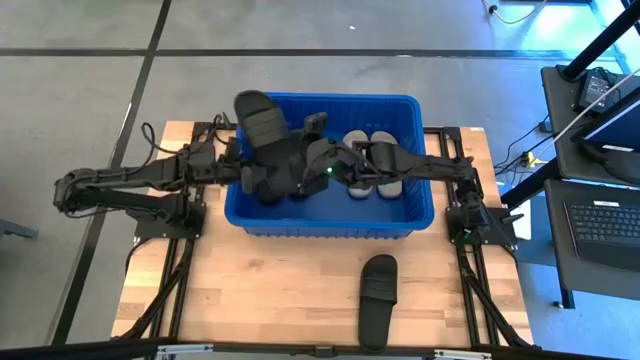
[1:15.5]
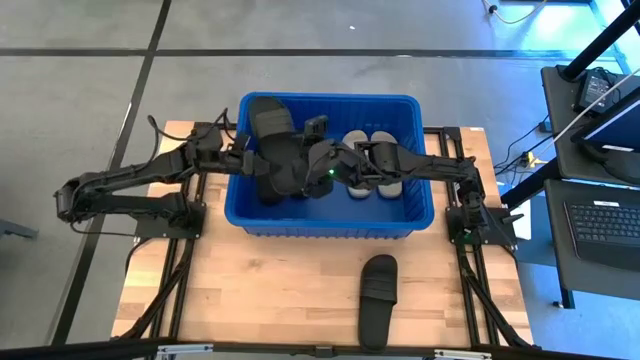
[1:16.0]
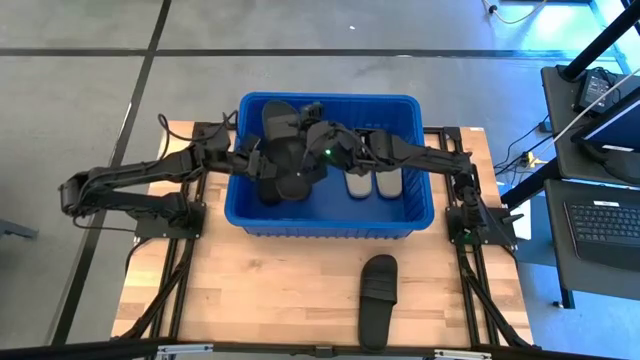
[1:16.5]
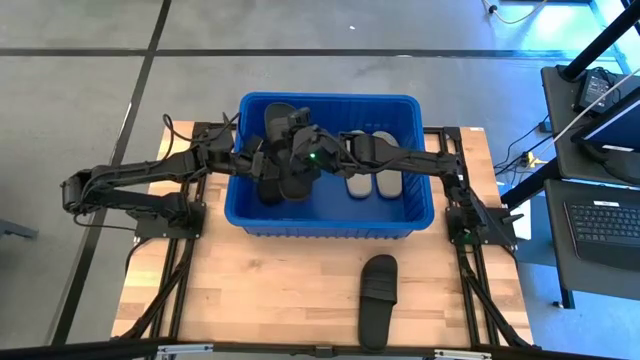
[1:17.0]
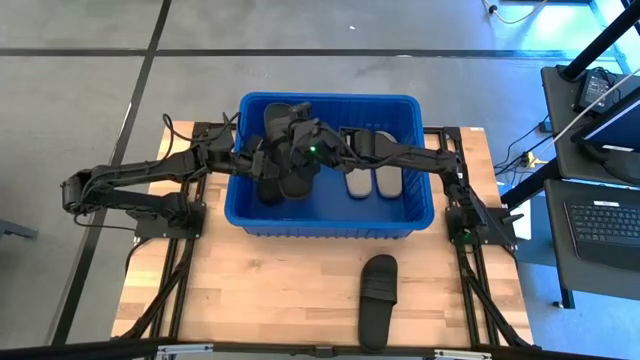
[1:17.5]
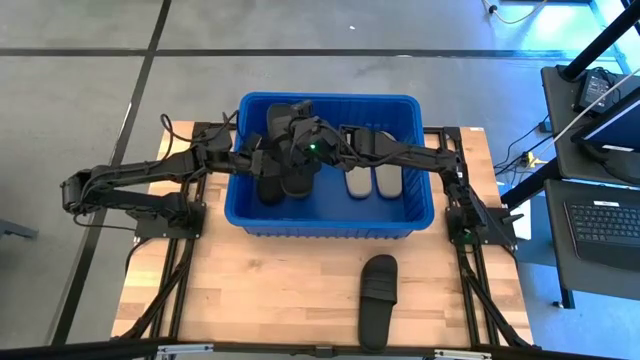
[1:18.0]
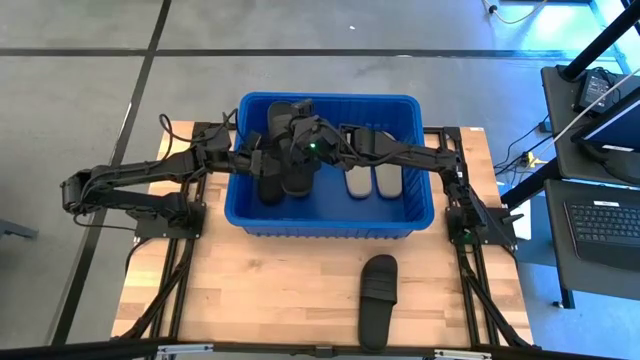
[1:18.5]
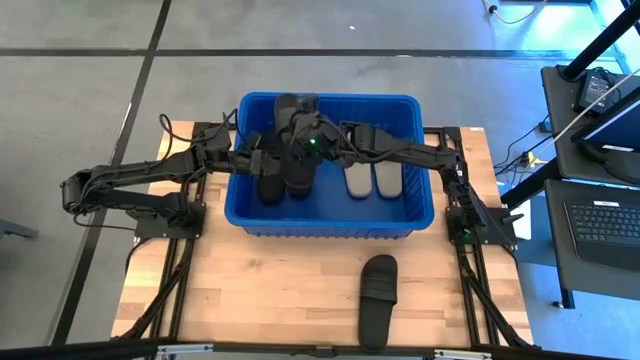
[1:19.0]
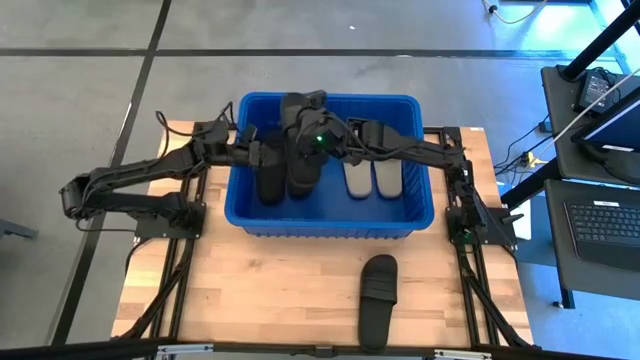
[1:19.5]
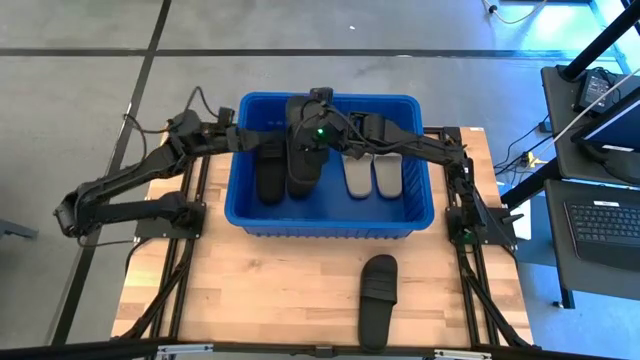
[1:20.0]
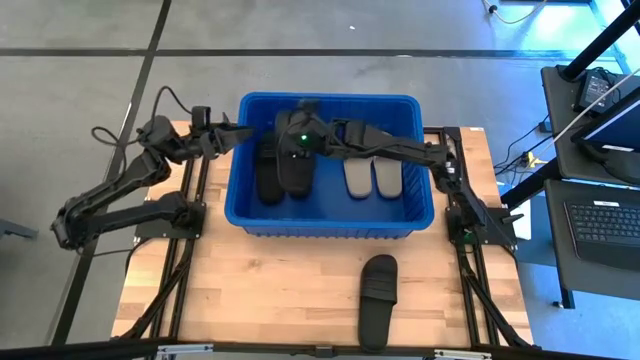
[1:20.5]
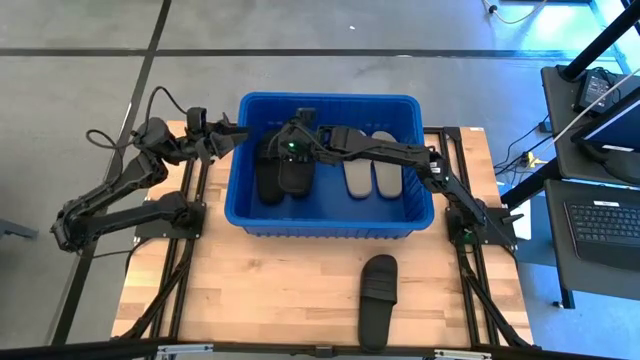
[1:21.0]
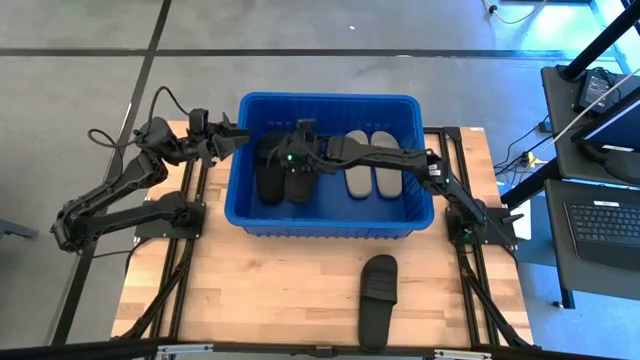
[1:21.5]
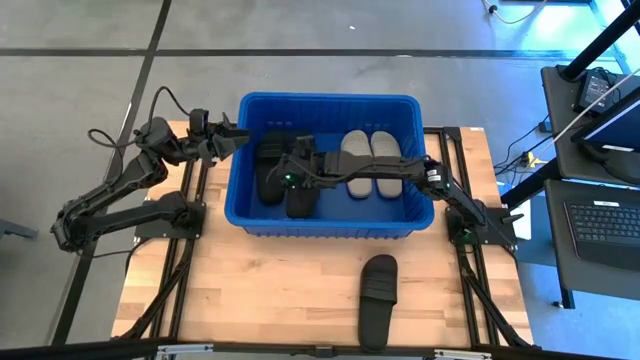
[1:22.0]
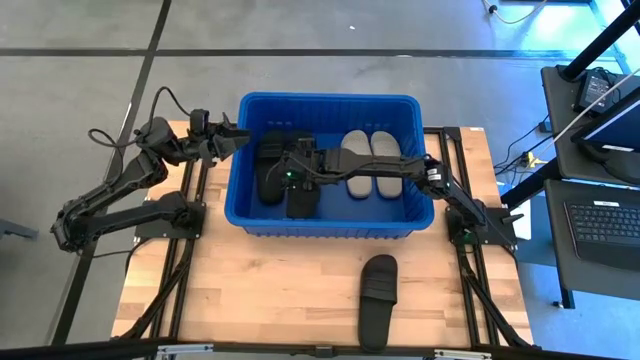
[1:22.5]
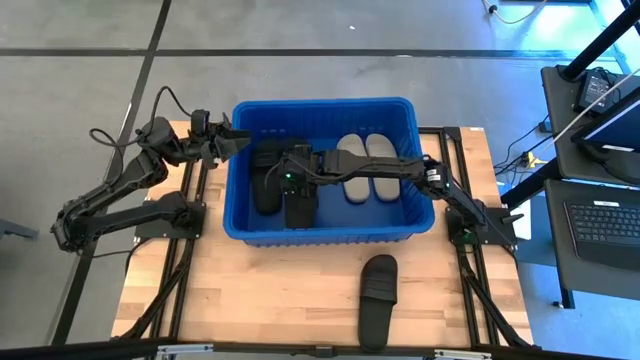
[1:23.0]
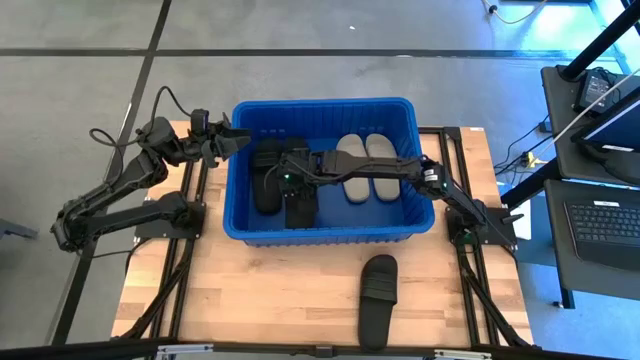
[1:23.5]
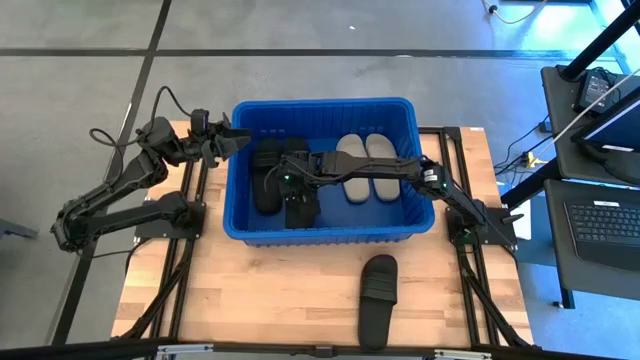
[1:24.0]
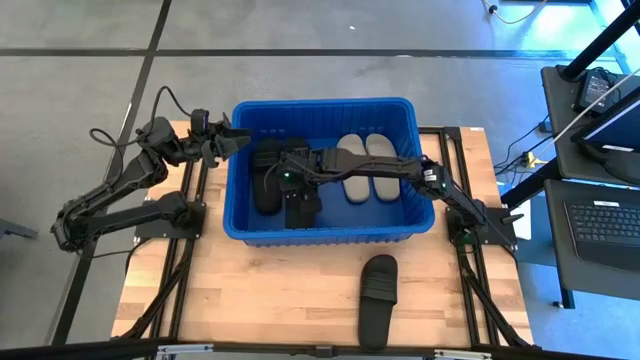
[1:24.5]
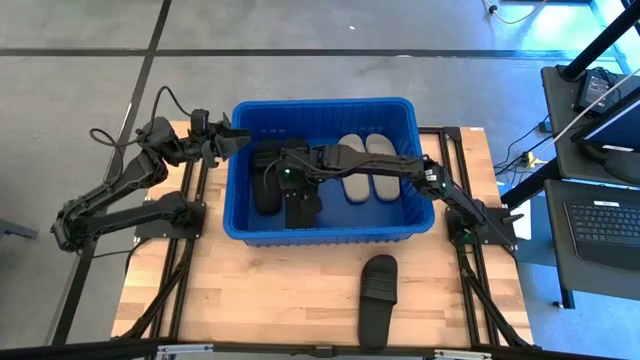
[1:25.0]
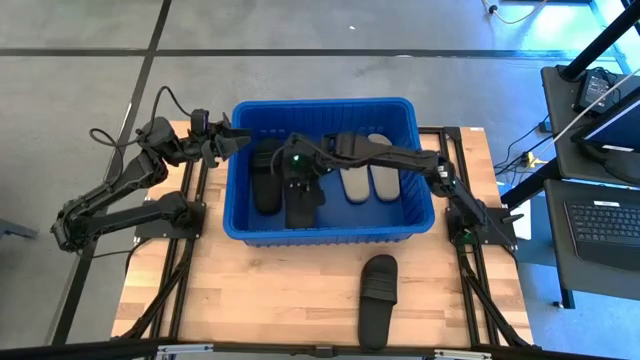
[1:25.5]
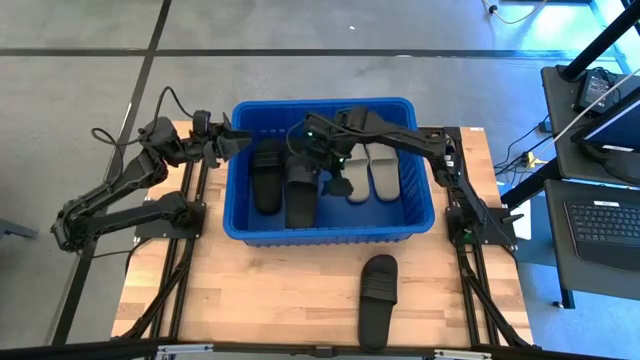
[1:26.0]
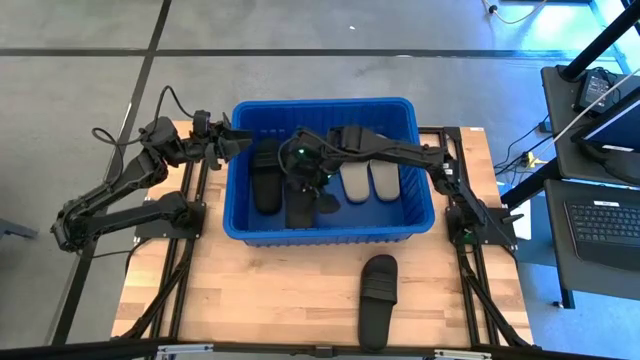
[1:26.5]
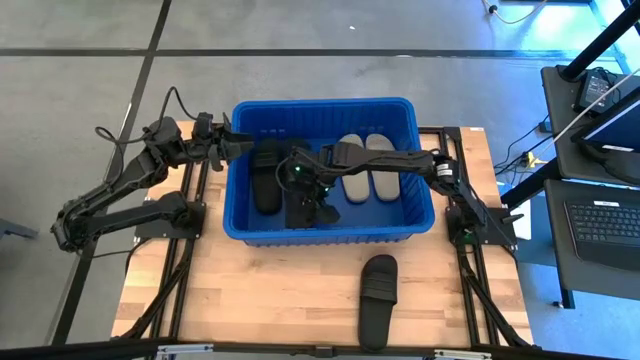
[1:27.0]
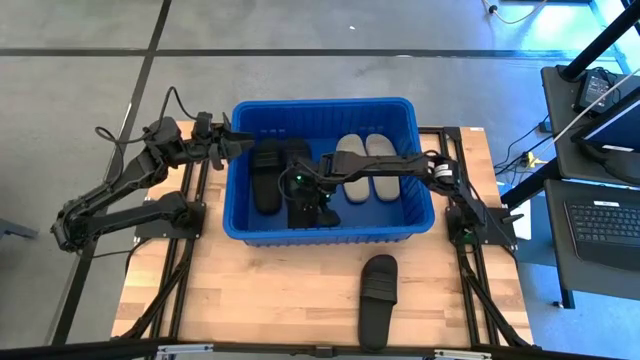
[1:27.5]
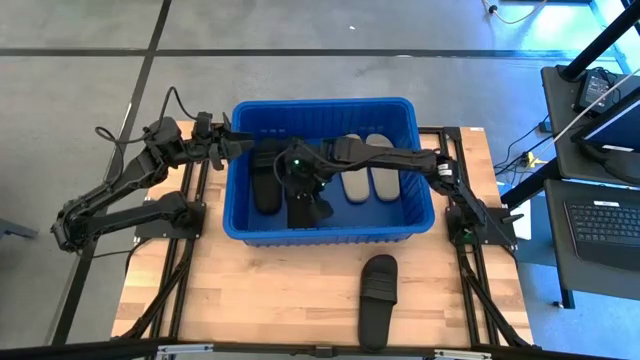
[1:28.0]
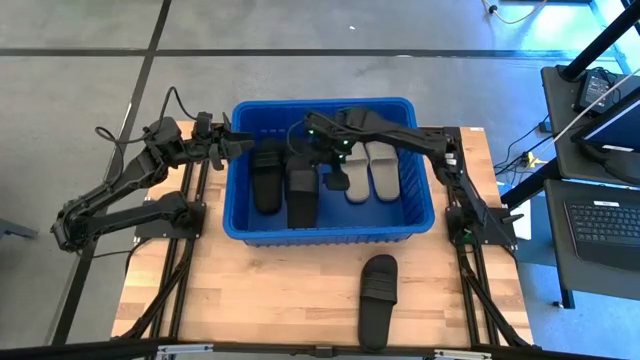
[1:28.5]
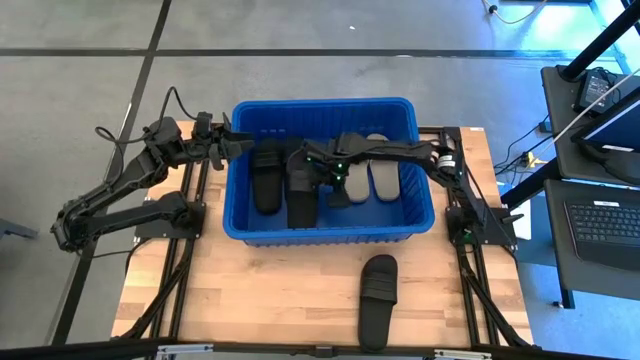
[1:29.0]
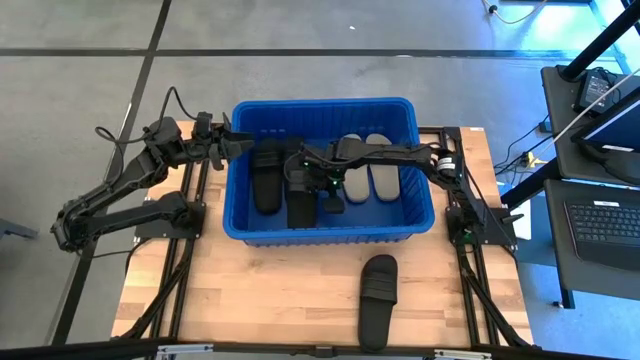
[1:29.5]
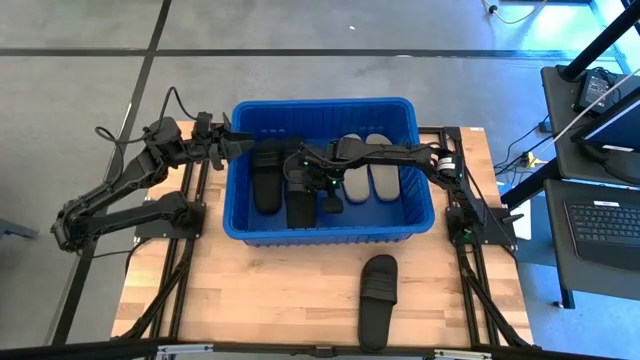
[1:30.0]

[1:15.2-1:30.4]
Task: Pick and place slides into bin
Put the black slipper into the blue container

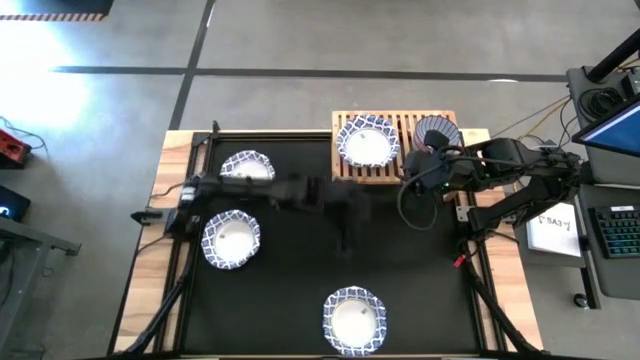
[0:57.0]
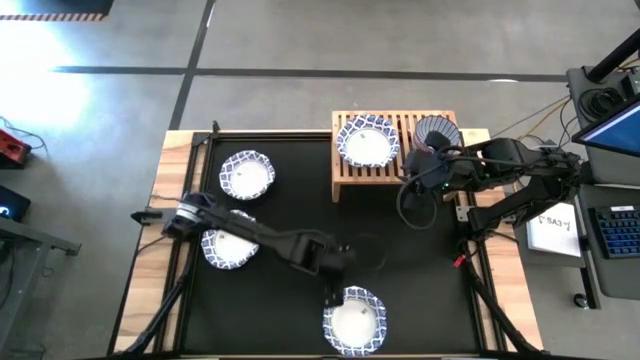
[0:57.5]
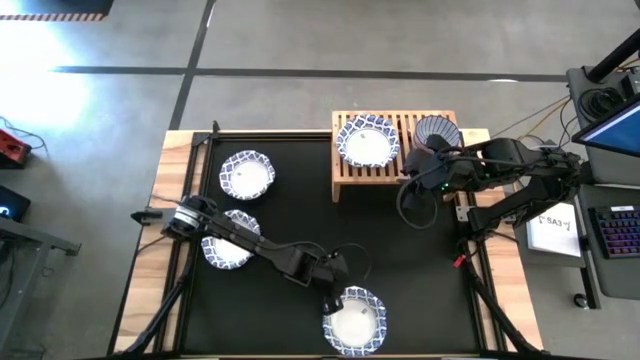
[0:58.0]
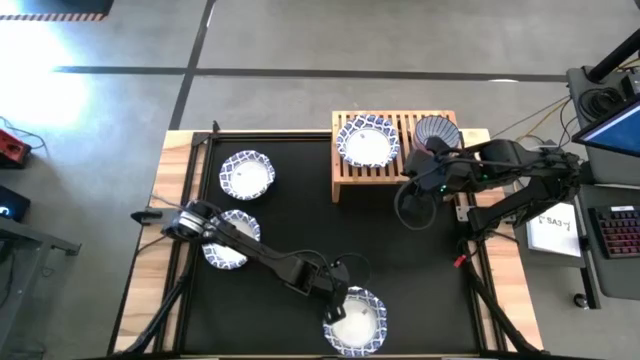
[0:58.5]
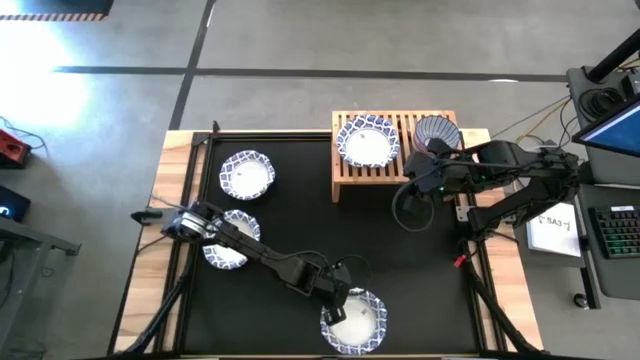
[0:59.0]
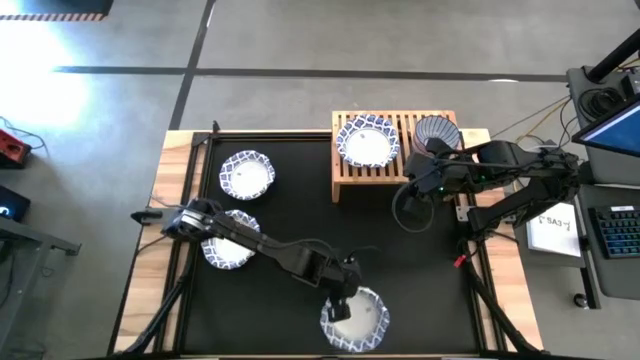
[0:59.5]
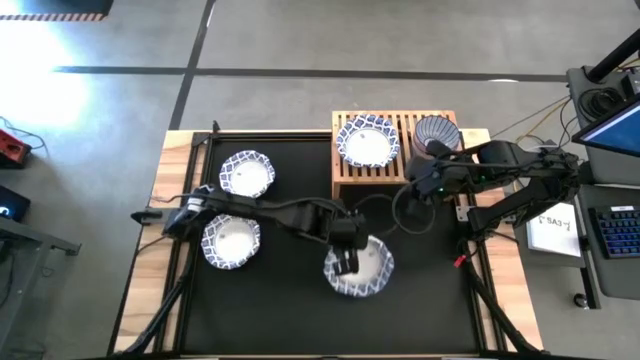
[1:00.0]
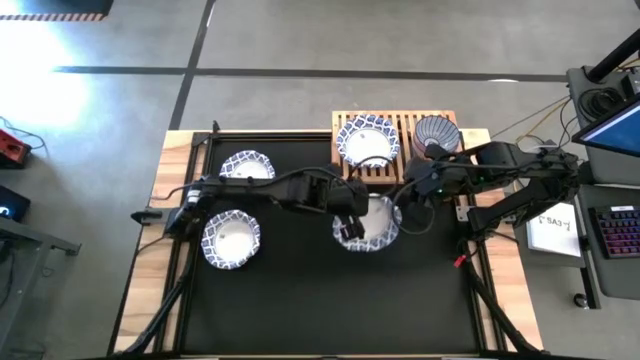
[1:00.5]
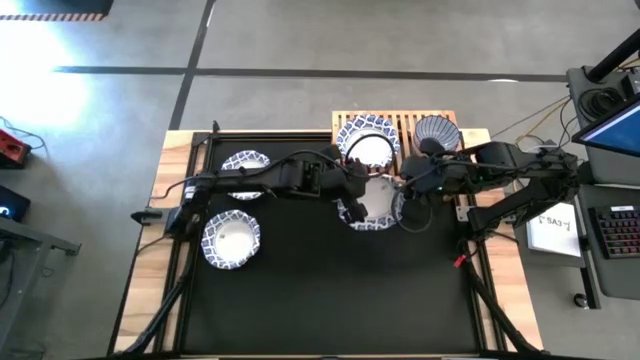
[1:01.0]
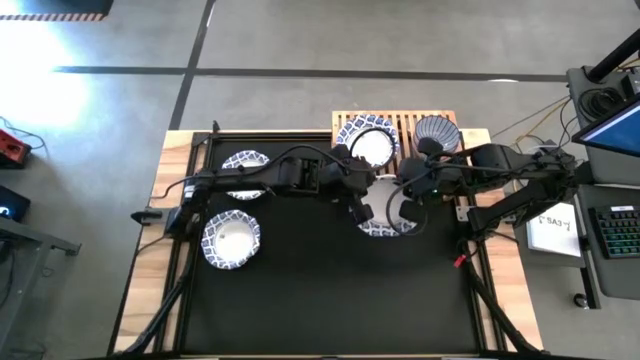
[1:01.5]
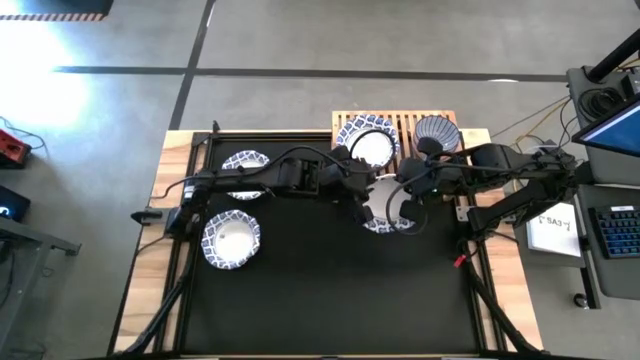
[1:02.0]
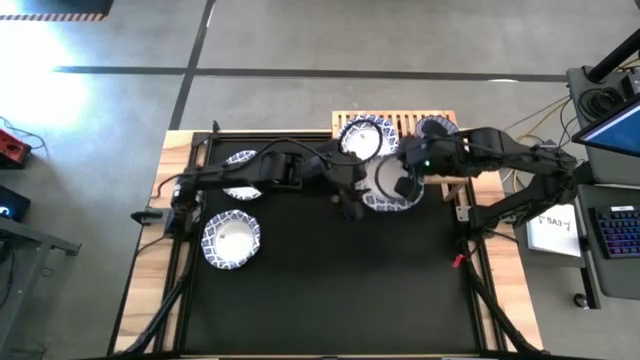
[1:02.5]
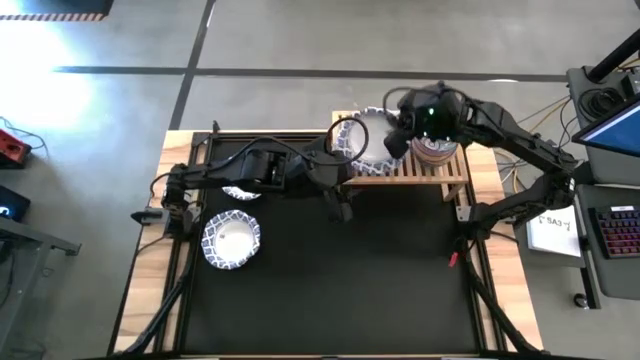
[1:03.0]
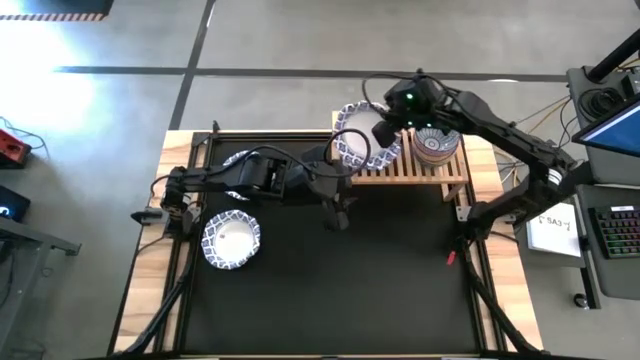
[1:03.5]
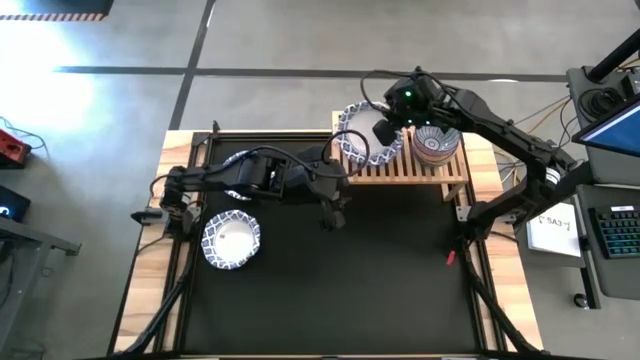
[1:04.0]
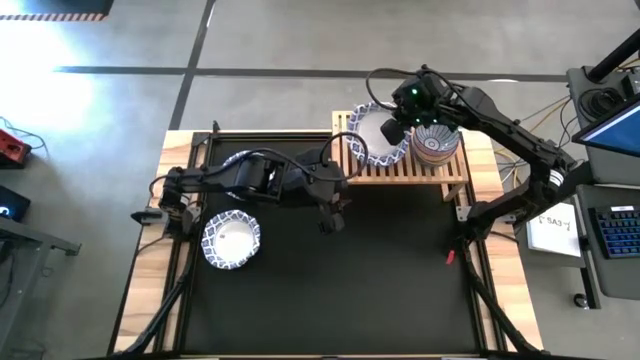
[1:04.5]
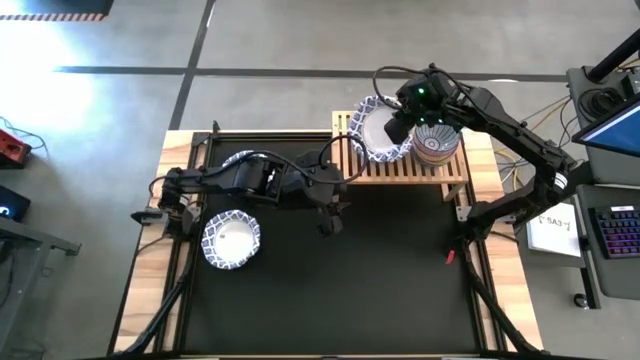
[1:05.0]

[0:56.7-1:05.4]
Task: Place and stack bowls onto a shelf
Stack the white bowl on top of the other white bowl on the shelf
